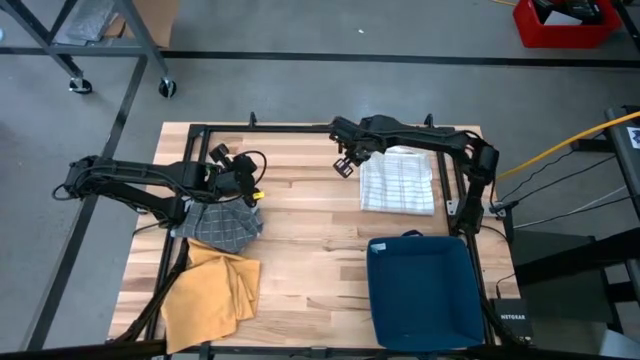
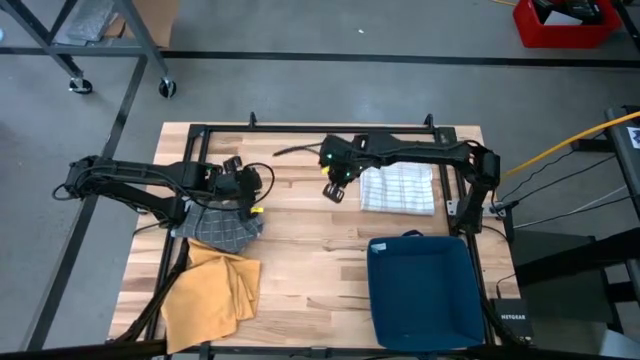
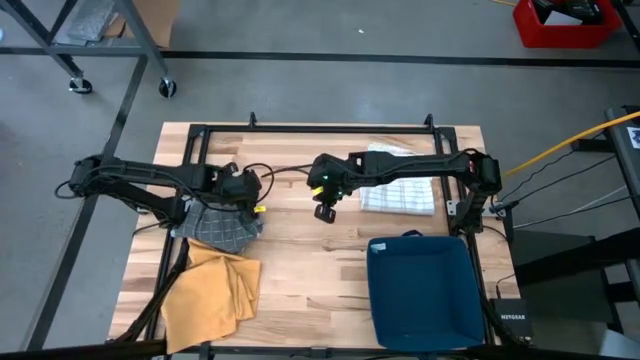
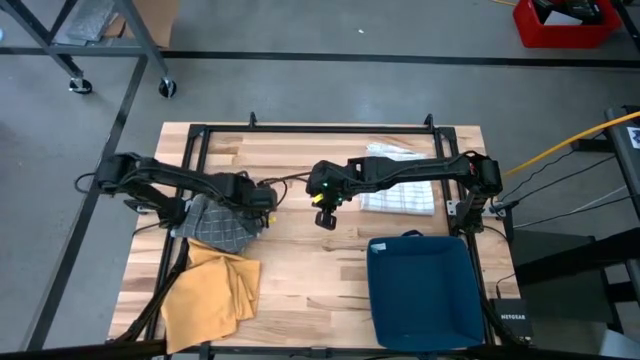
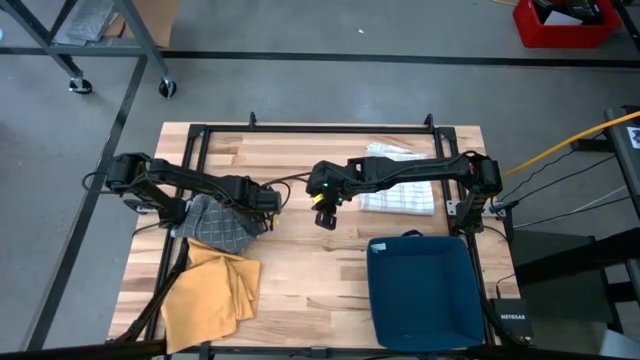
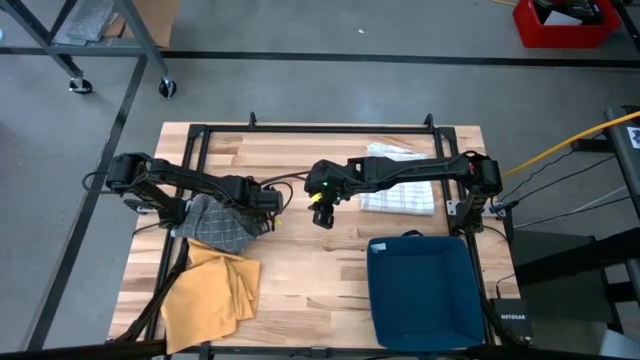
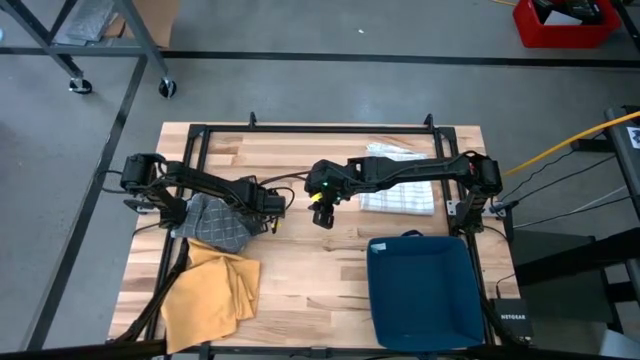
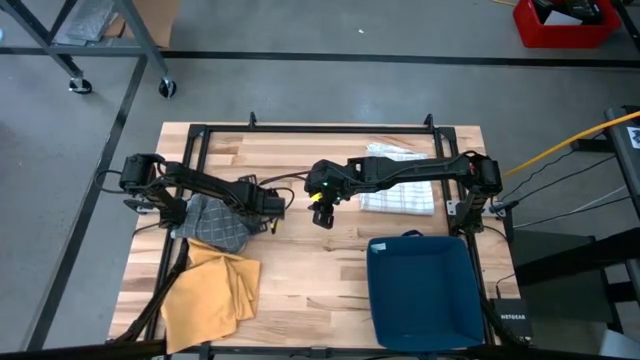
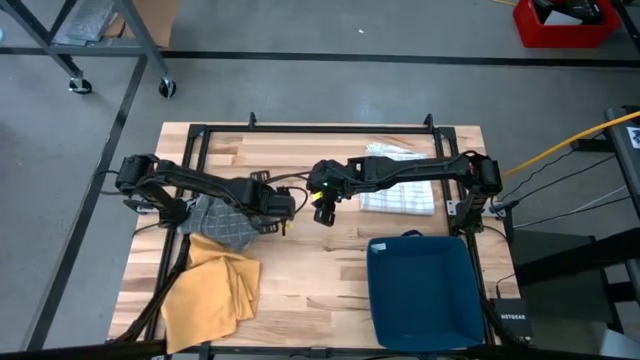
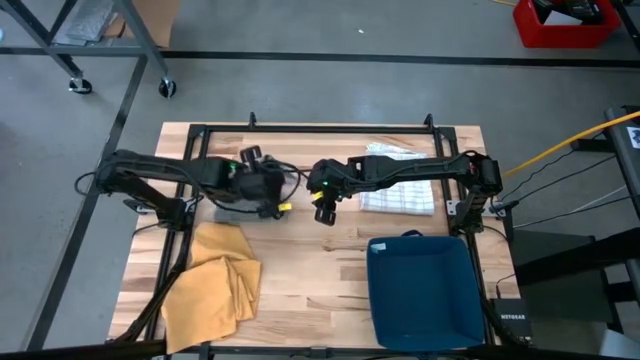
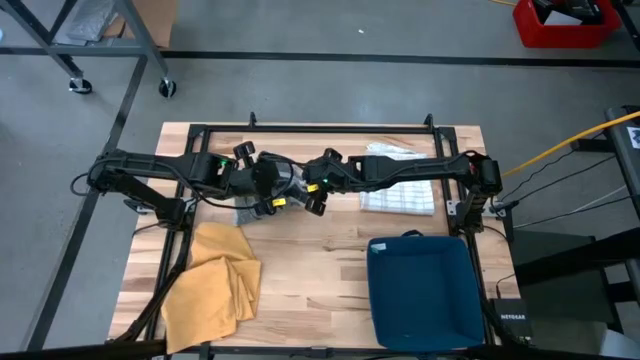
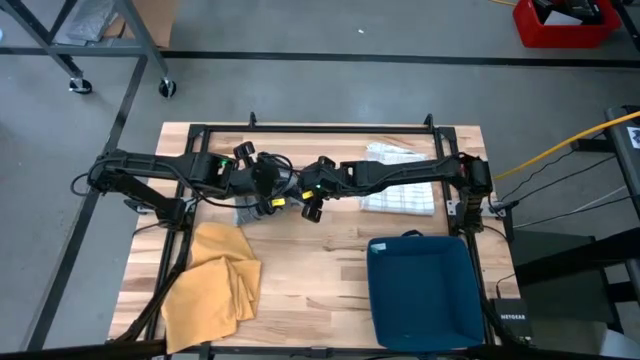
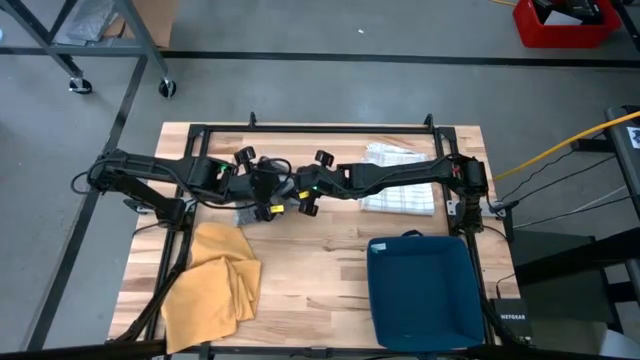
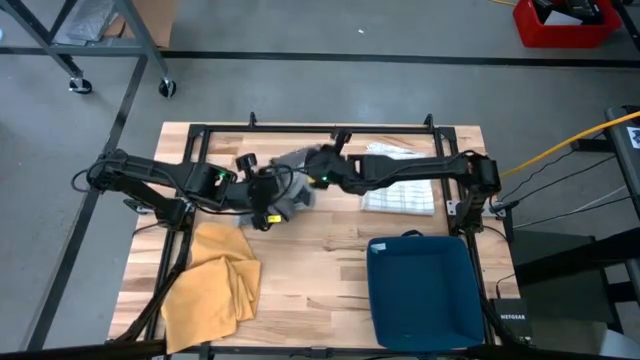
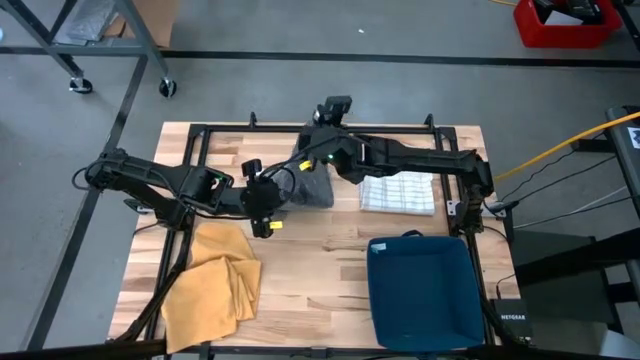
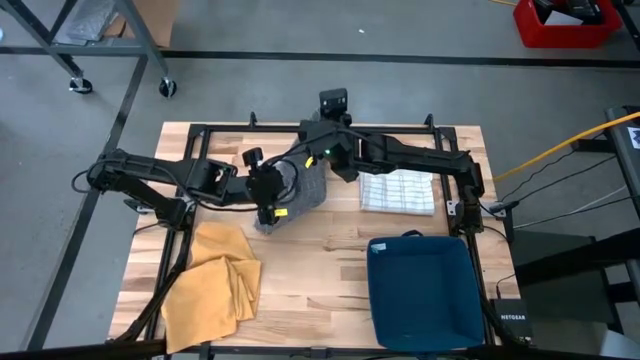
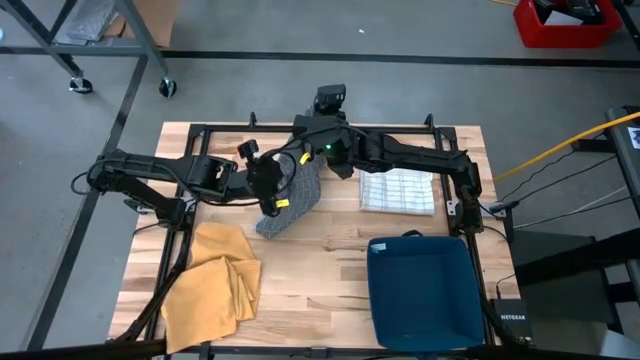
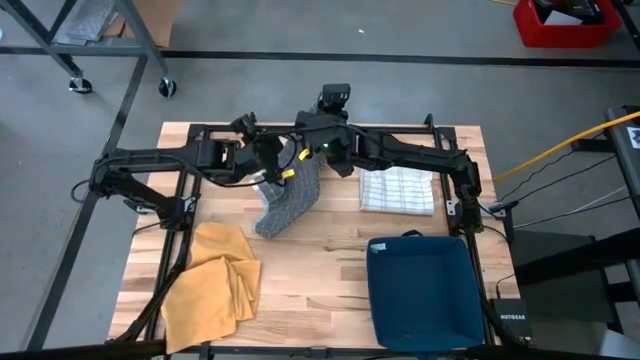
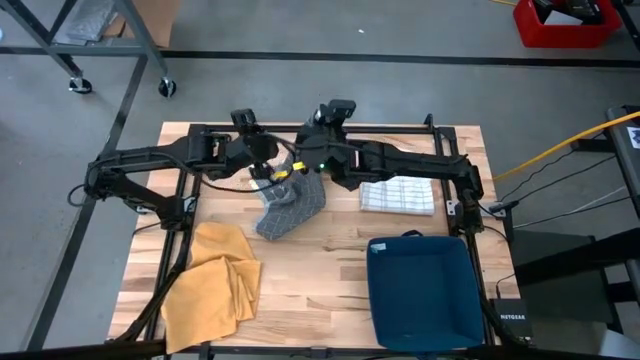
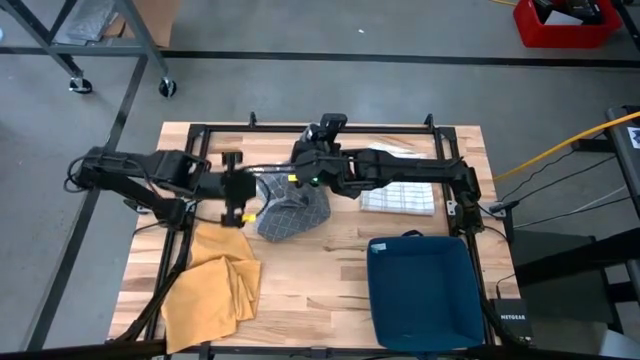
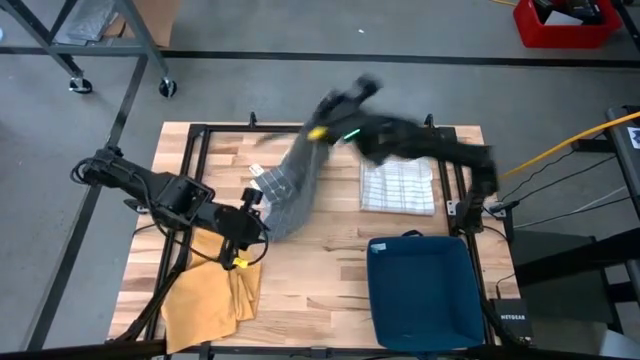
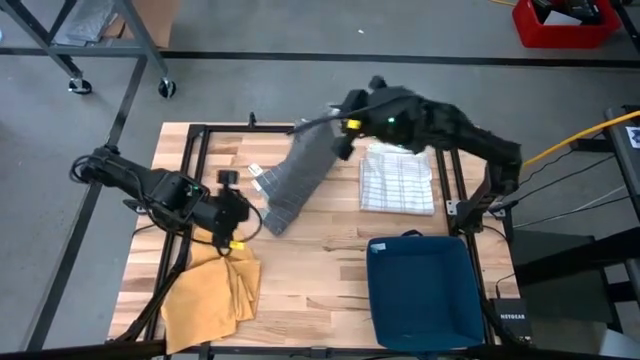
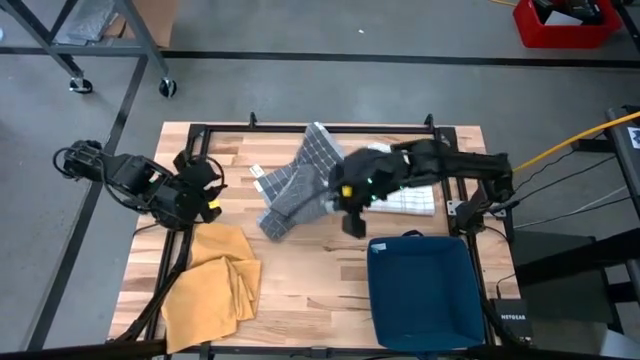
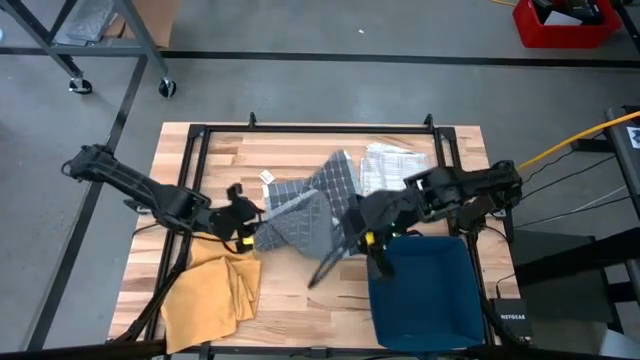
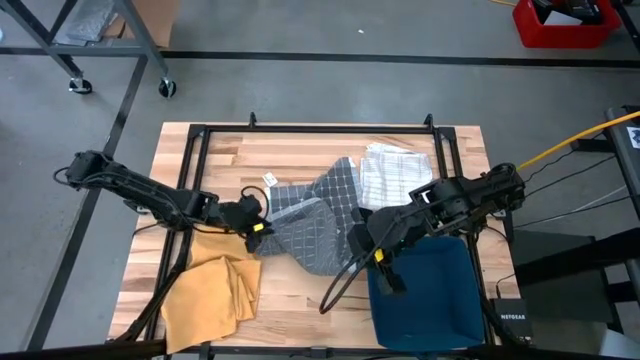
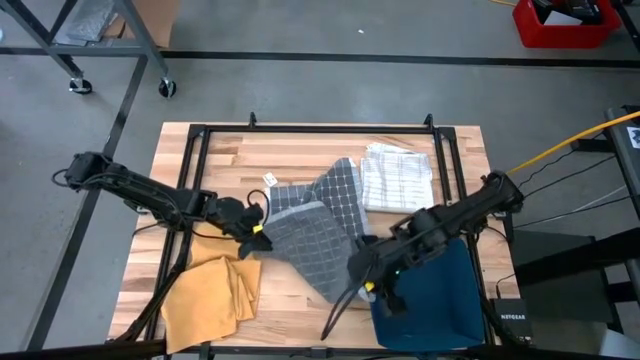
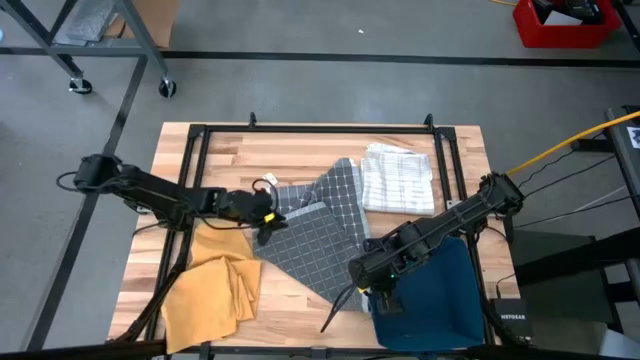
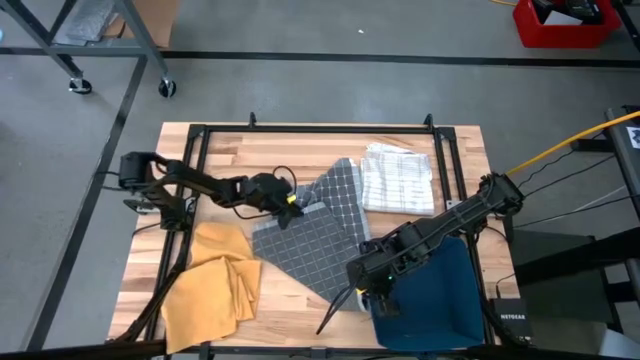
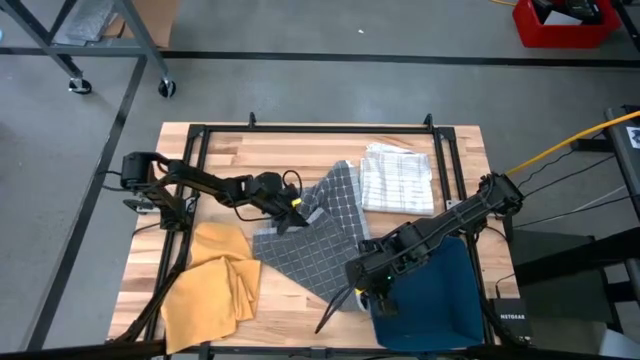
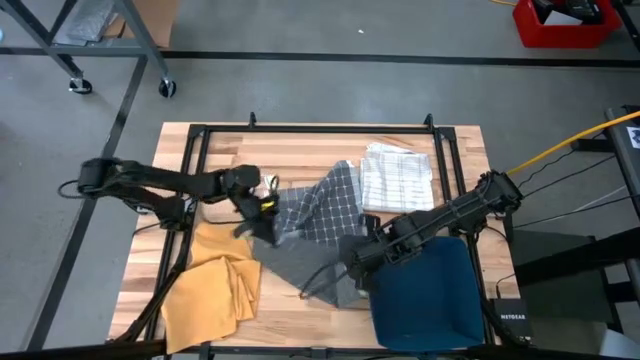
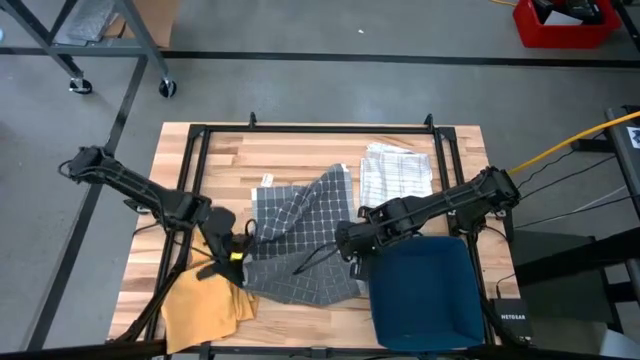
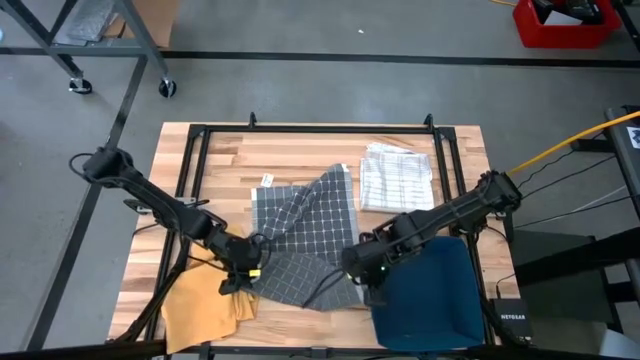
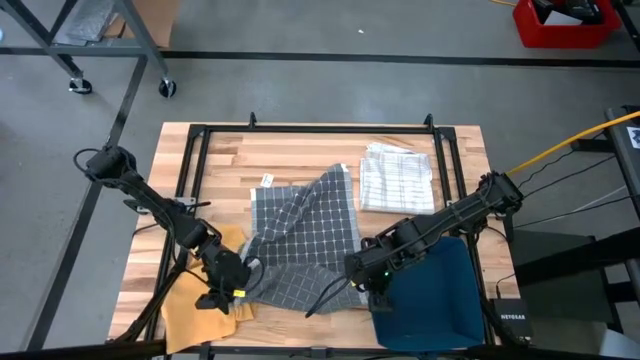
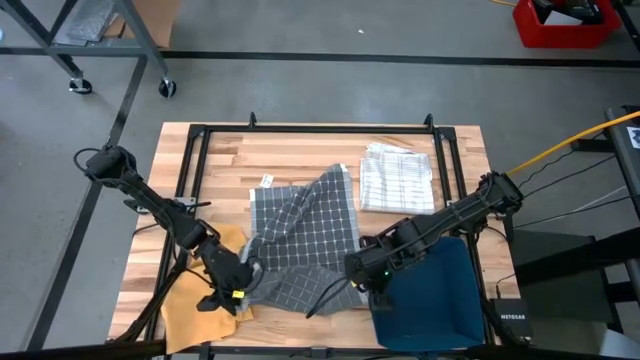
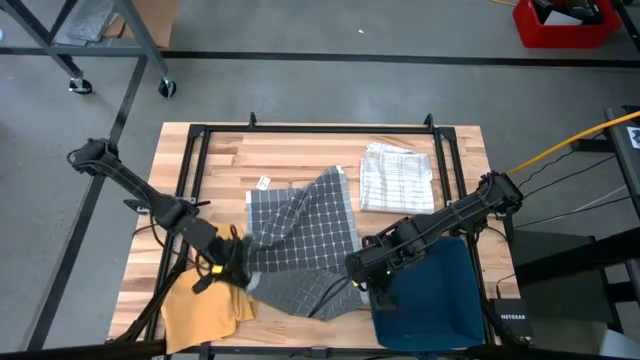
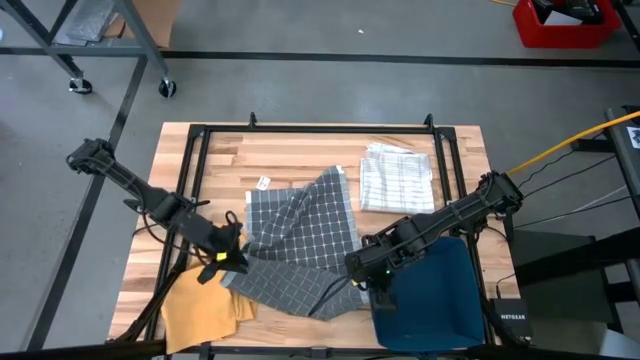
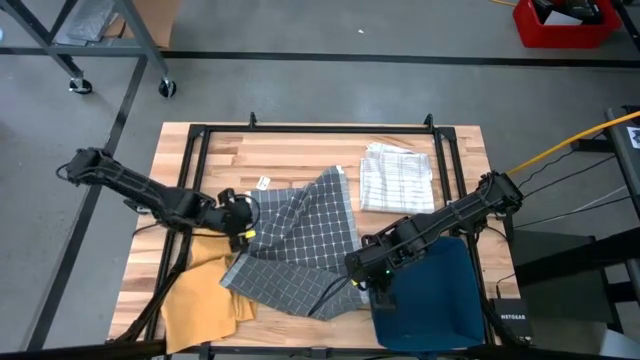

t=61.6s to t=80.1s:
Task: Fold towel
Fold the gray towel
